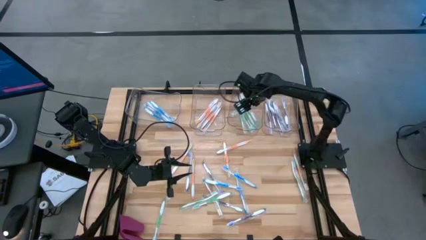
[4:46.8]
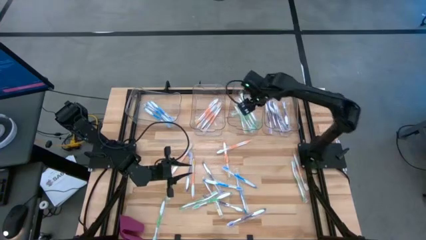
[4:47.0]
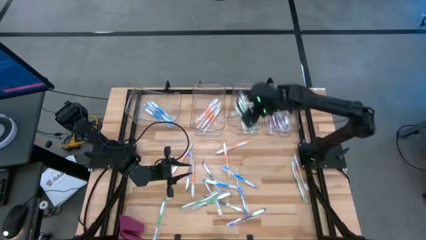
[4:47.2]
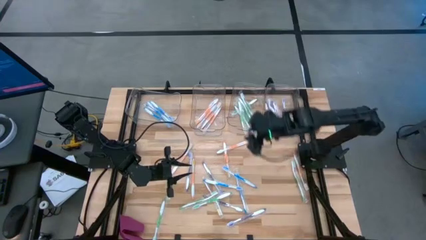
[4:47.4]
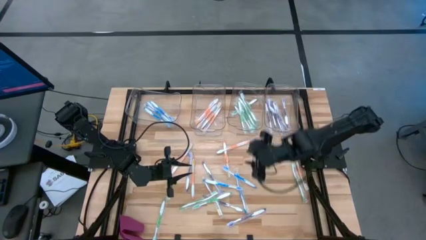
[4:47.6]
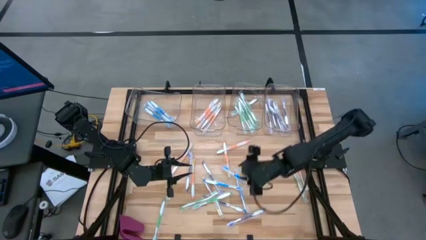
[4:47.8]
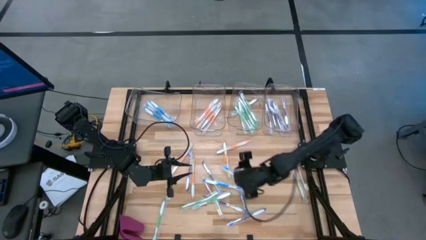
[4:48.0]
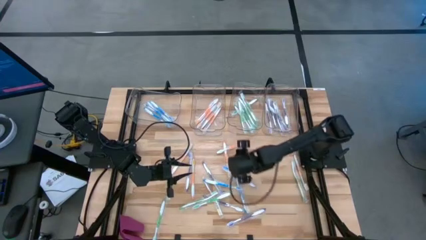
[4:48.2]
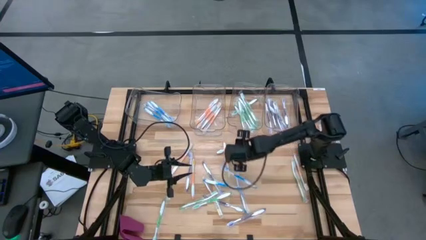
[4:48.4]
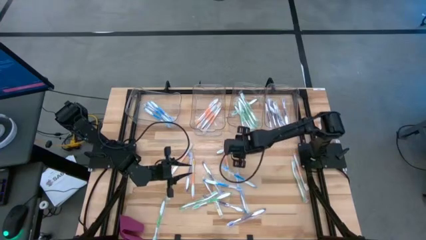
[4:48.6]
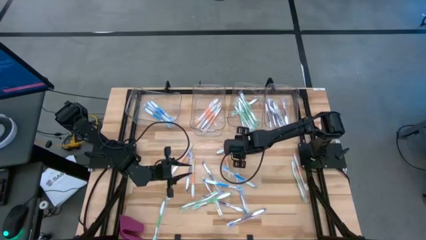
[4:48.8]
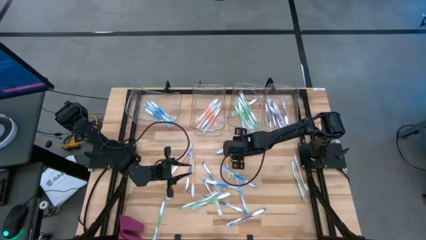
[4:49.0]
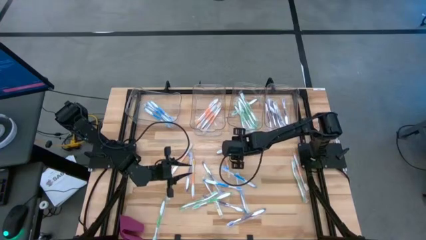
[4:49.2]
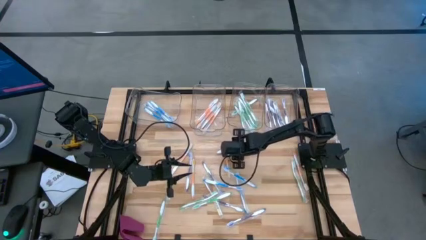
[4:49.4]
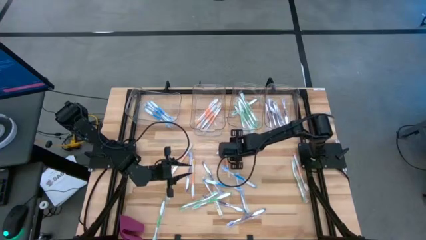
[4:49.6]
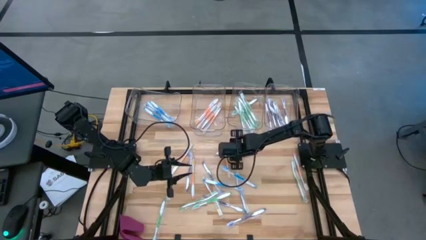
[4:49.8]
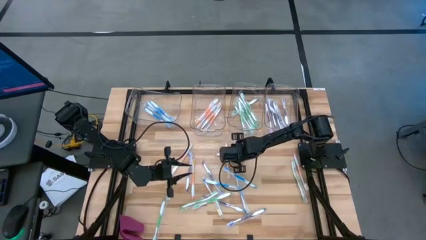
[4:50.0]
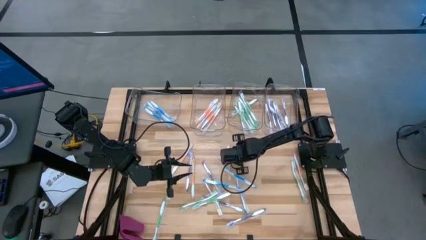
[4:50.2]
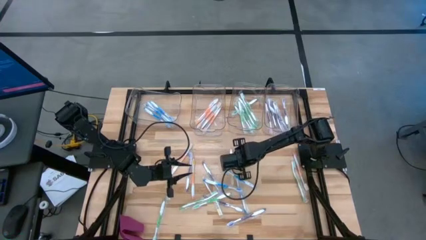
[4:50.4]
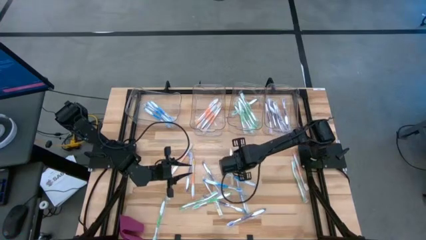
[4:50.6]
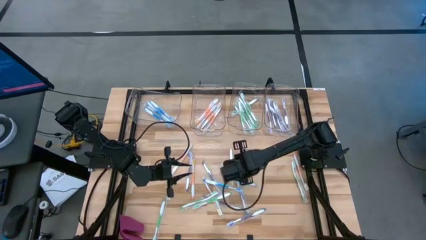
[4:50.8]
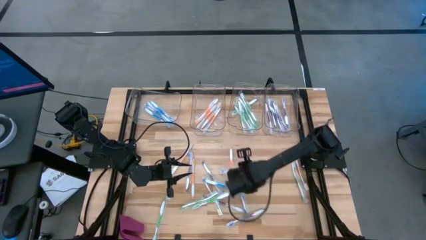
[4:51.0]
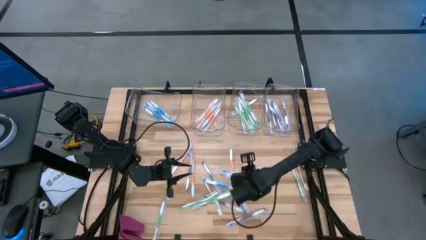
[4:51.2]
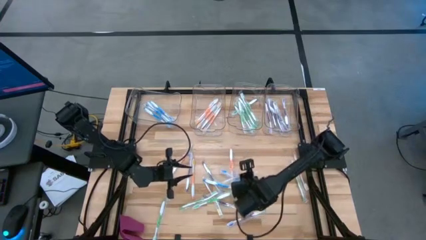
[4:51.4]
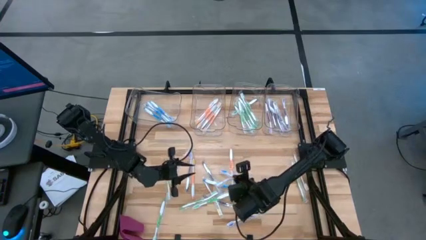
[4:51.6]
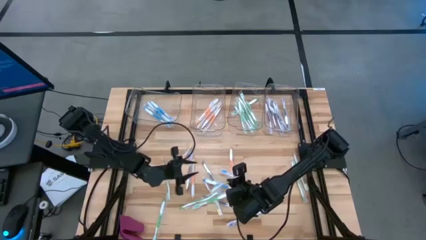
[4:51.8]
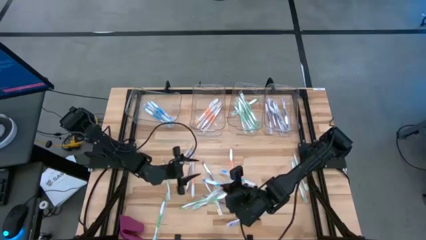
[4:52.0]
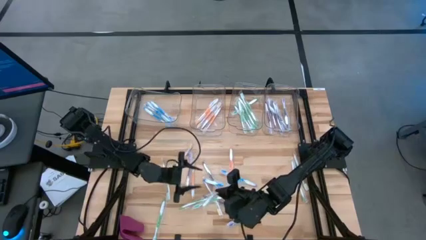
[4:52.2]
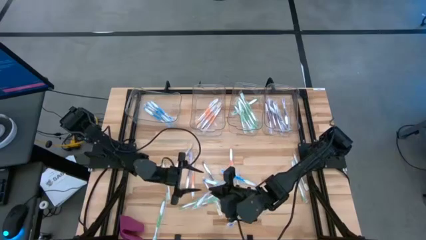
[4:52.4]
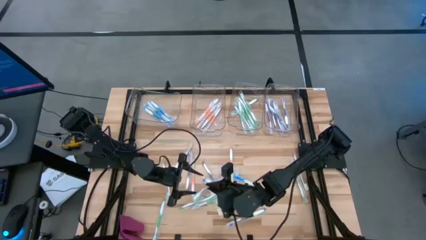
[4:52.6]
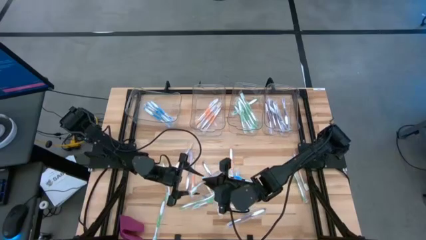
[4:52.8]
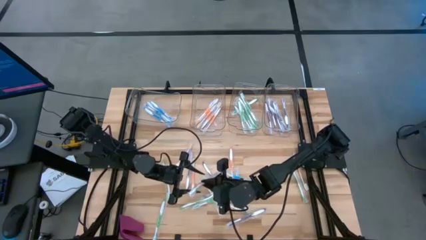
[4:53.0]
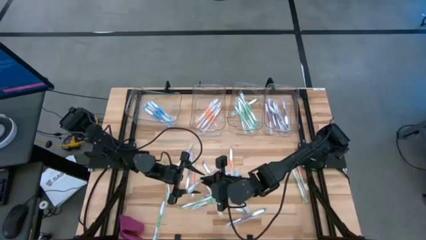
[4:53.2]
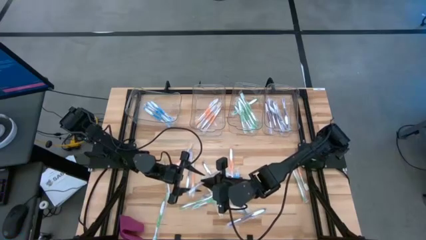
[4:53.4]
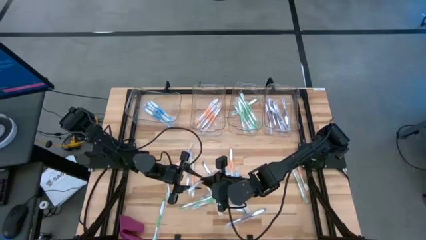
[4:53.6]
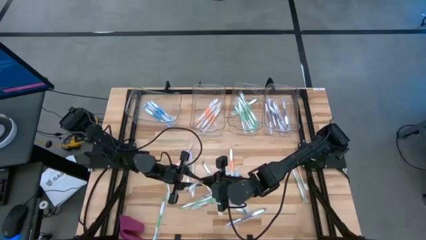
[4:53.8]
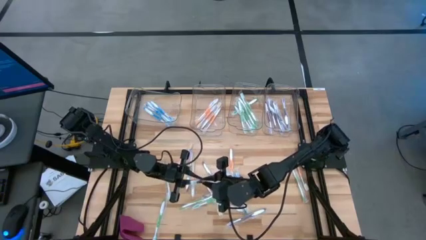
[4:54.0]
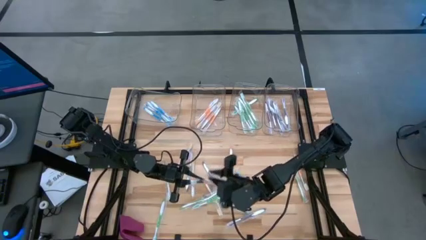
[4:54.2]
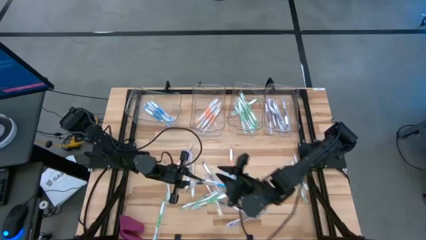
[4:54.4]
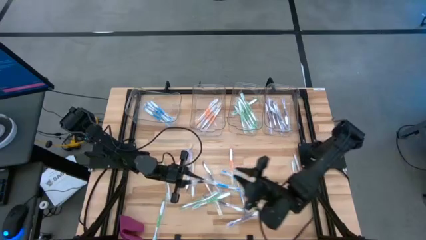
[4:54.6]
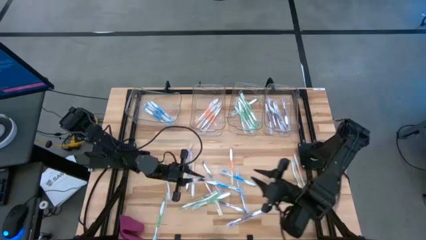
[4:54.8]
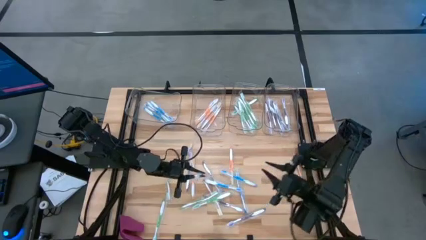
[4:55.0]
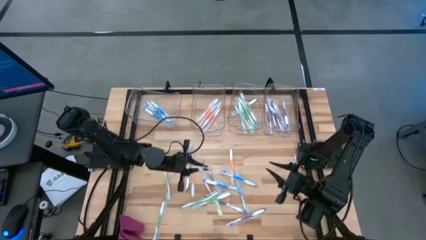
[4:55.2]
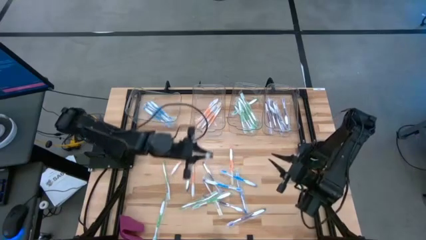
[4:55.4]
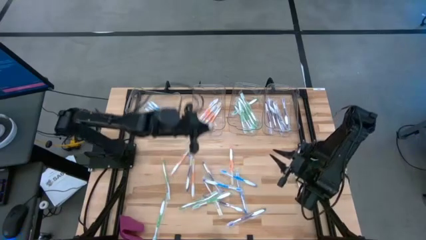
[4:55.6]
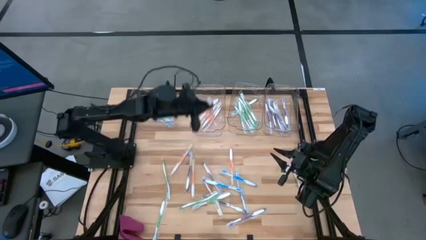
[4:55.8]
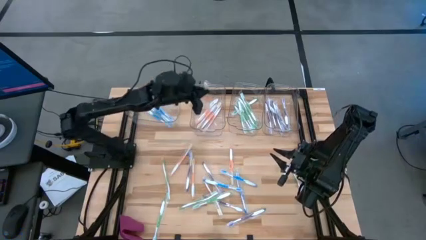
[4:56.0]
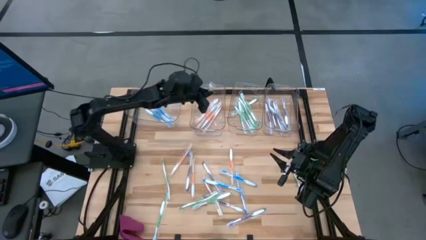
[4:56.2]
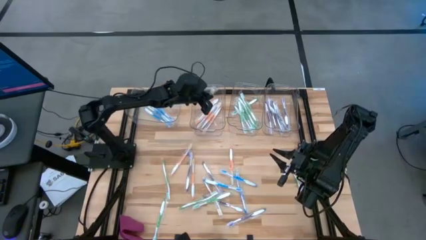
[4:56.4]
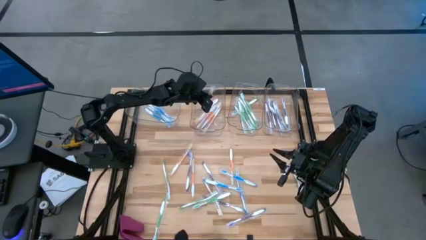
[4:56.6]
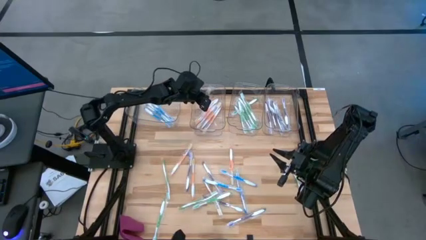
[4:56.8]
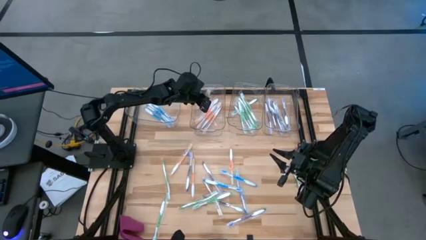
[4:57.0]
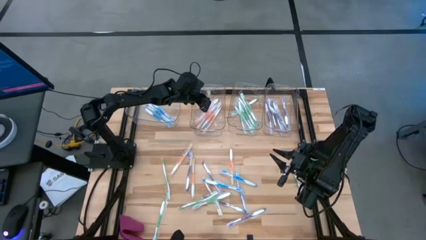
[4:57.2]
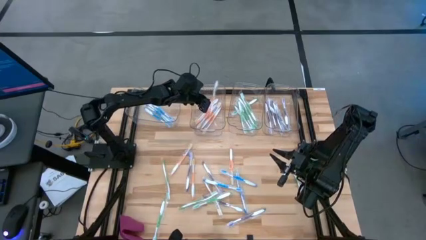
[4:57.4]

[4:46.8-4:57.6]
Task: Pick & Place Toothbrushes
Put the orange toothbrush into the middle left transparent bin

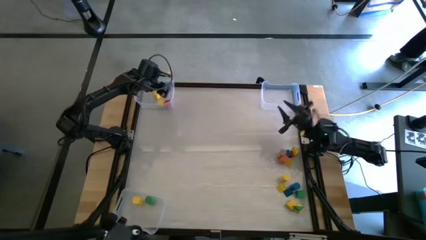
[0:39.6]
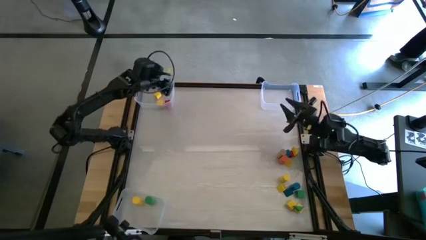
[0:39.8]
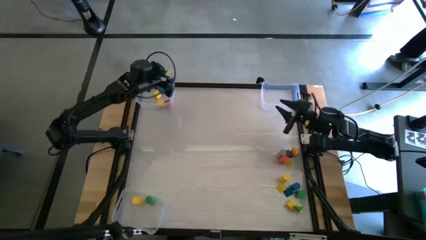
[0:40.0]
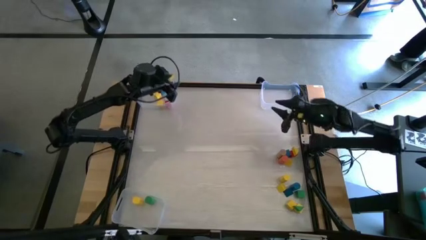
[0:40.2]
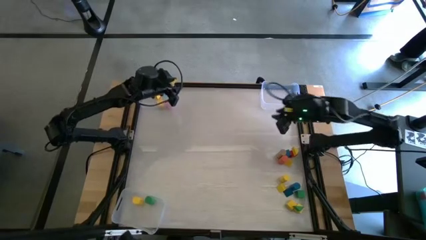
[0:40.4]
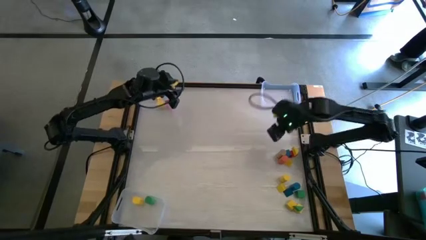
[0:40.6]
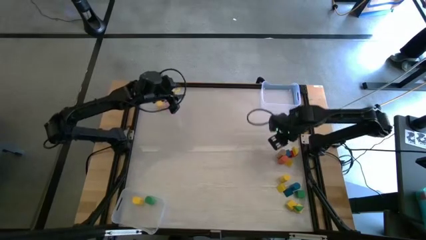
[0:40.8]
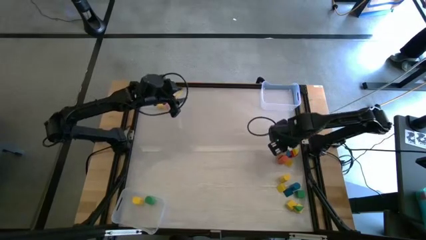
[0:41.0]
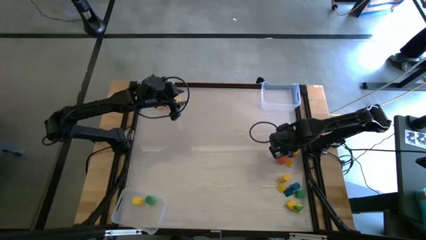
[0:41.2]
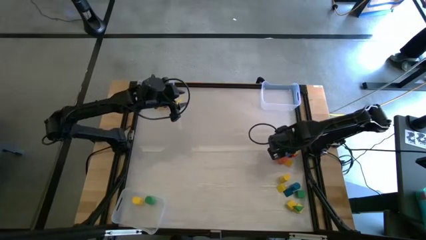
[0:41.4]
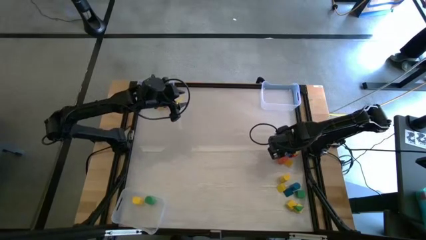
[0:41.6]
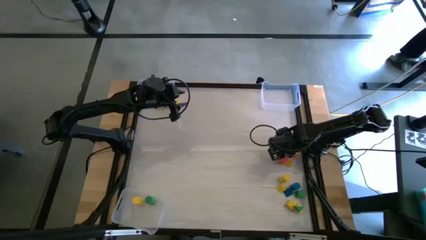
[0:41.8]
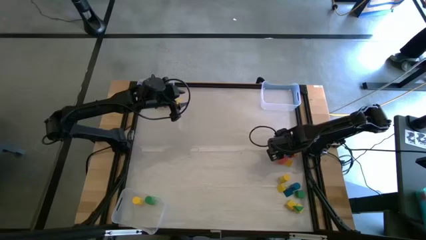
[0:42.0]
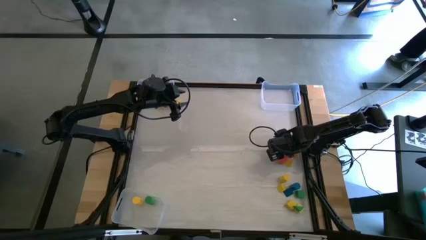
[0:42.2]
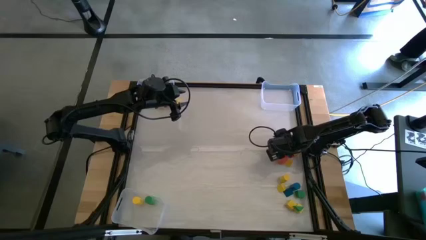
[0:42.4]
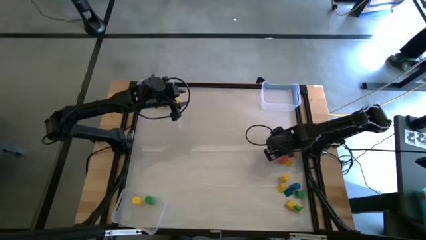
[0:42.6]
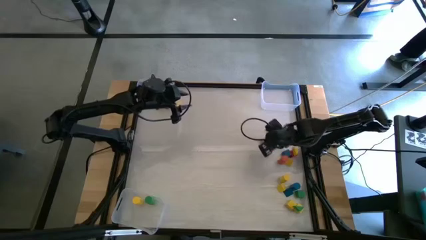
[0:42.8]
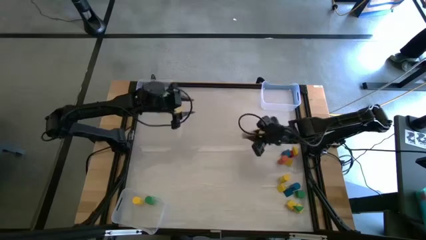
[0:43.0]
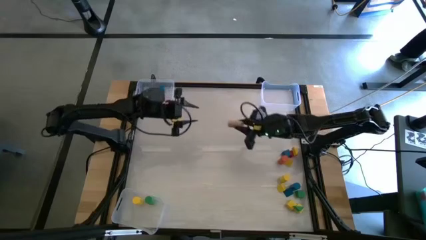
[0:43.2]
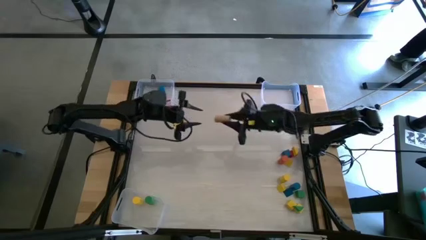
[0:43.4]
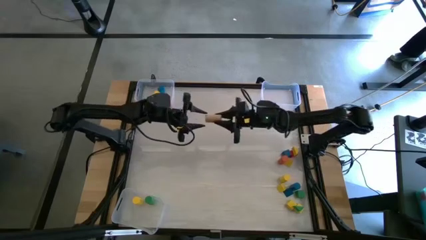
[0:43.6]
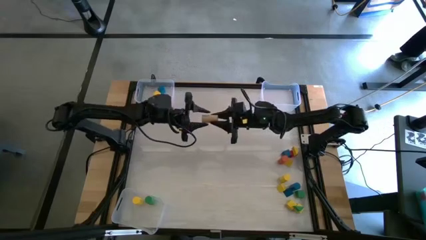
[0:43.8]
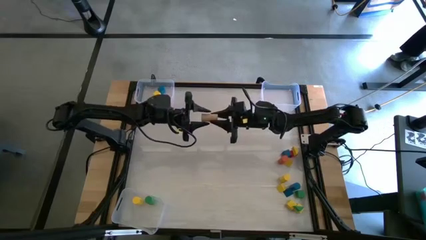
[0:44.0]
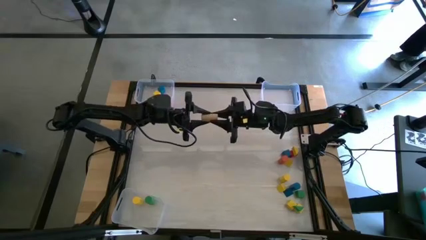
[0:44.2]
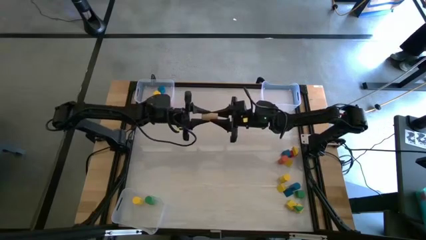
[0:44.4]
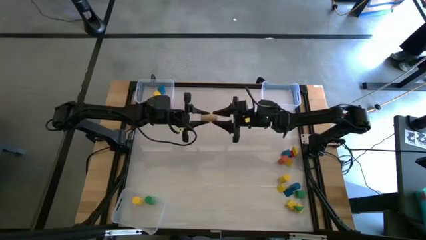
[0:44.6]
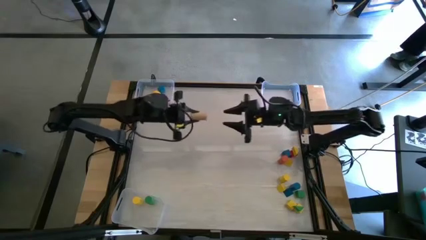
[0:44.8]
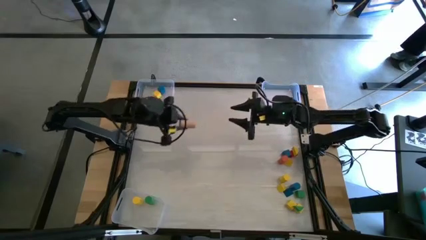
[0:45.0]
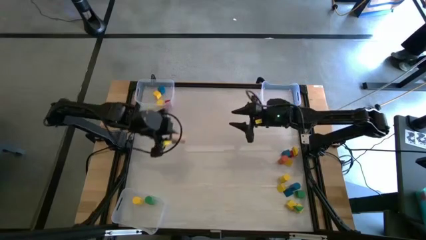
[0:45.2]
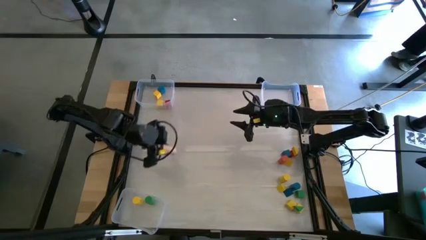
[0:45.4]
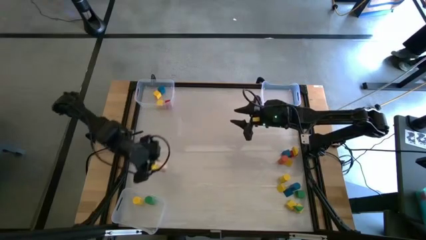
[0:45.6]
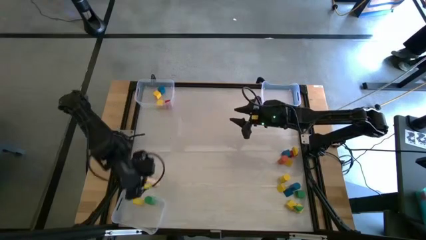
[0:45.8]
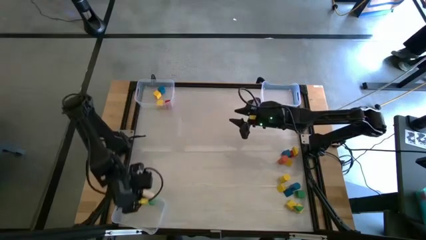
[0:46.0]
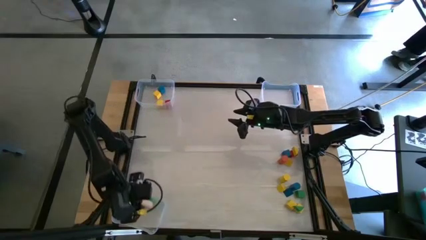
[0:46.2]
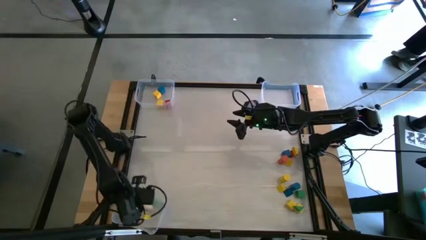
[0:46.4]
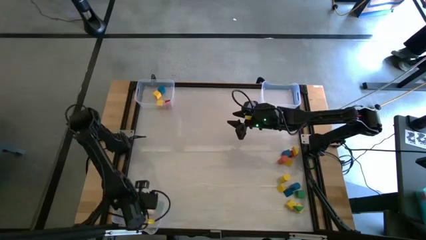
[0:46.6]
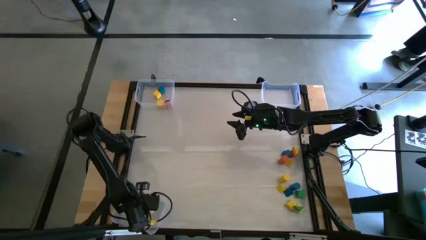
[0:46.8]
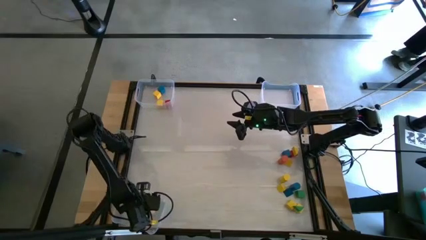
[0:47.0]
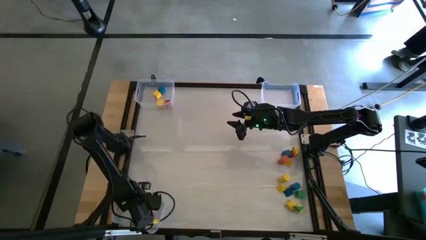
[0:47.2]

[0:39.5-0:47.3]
Task: Sort blocks by size
Put the right brown cylinder block into the bottom transparent bin
